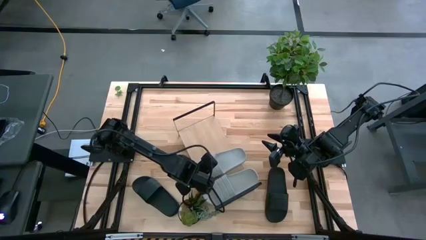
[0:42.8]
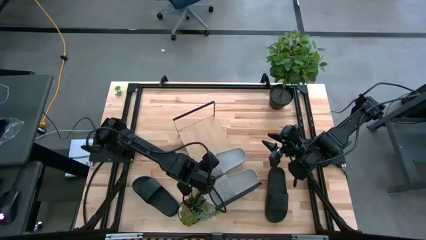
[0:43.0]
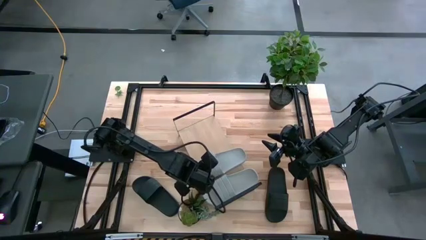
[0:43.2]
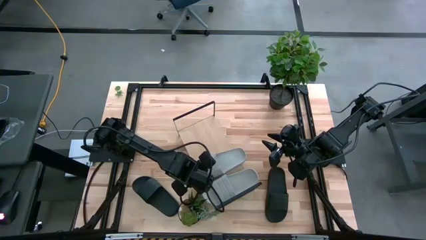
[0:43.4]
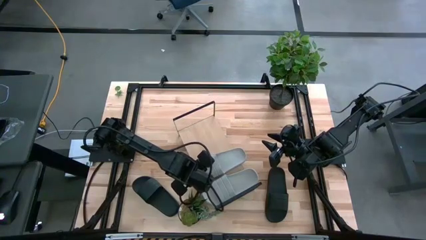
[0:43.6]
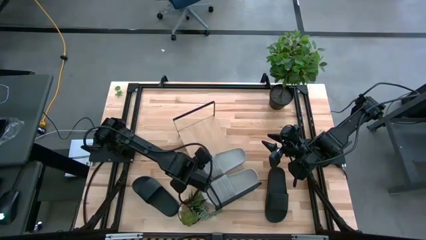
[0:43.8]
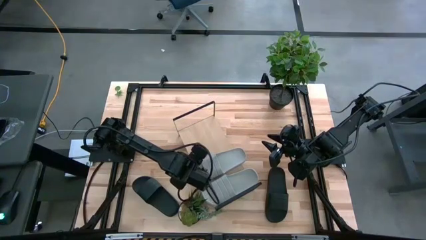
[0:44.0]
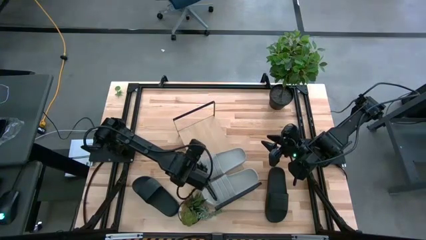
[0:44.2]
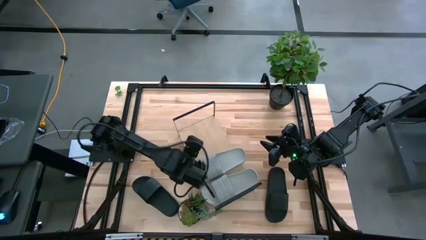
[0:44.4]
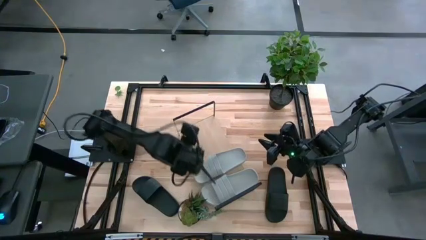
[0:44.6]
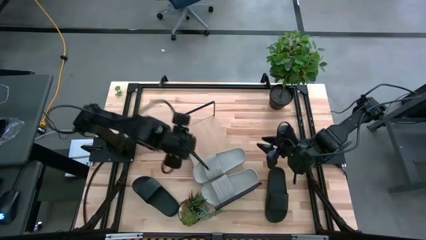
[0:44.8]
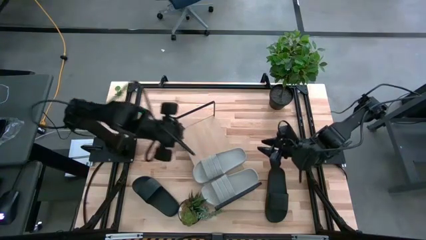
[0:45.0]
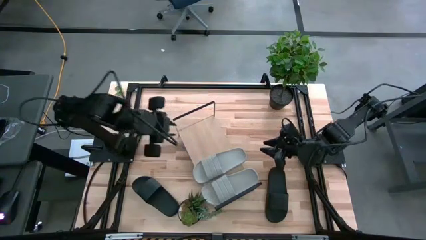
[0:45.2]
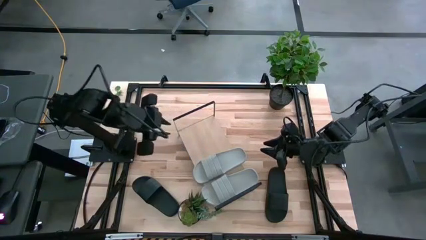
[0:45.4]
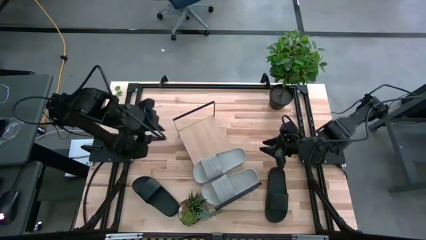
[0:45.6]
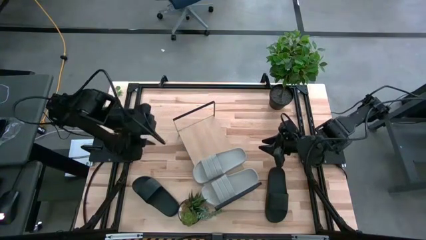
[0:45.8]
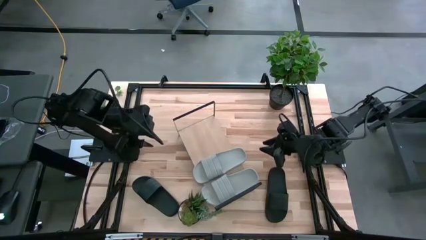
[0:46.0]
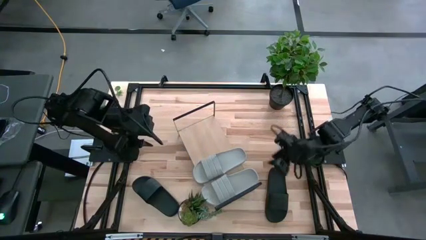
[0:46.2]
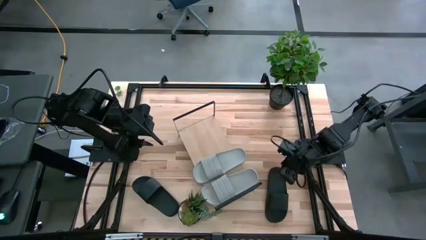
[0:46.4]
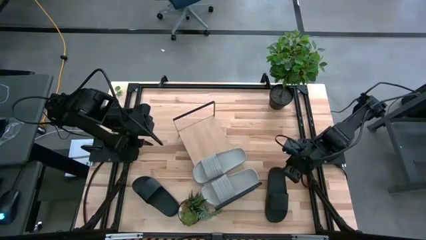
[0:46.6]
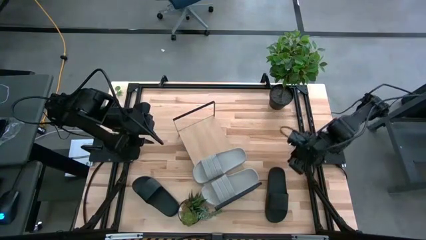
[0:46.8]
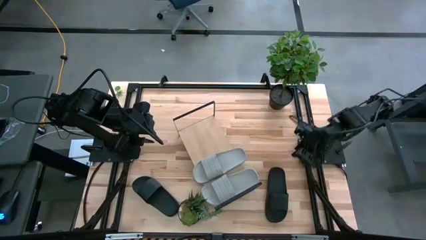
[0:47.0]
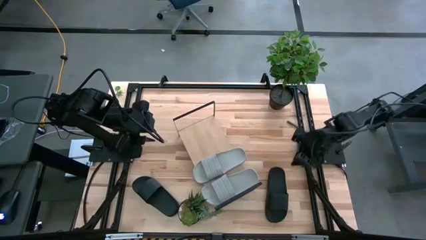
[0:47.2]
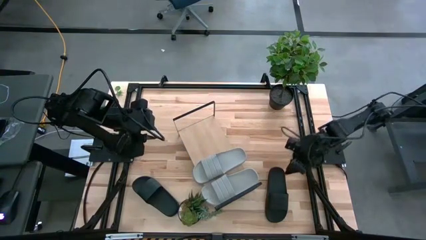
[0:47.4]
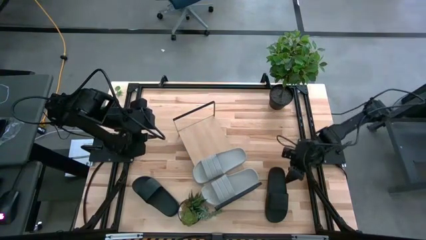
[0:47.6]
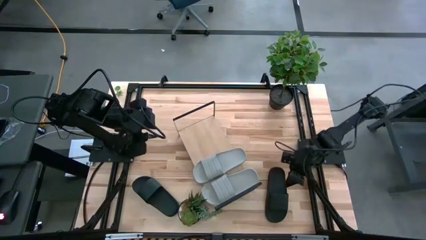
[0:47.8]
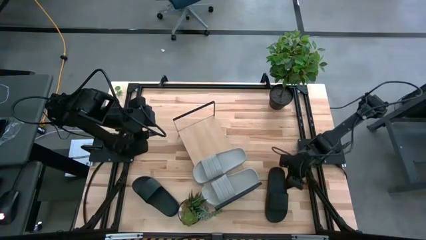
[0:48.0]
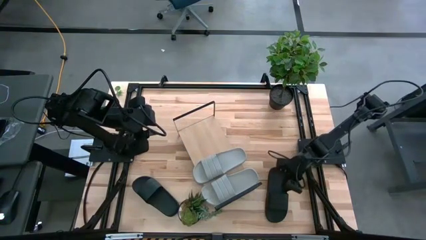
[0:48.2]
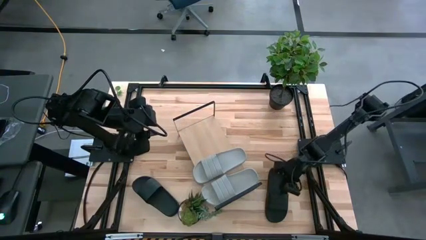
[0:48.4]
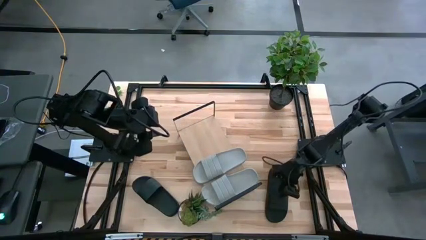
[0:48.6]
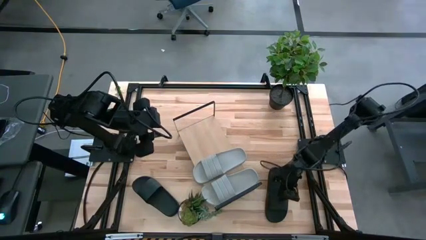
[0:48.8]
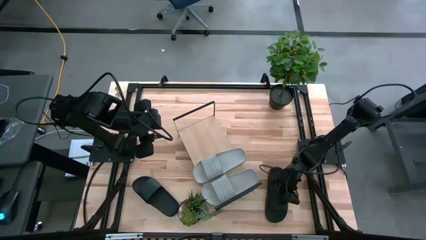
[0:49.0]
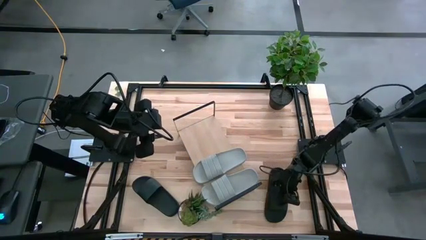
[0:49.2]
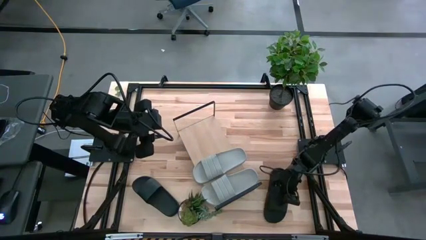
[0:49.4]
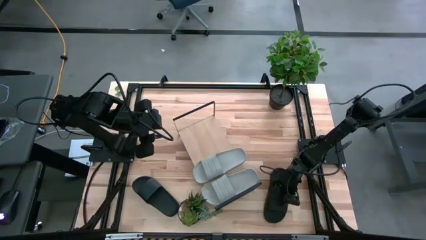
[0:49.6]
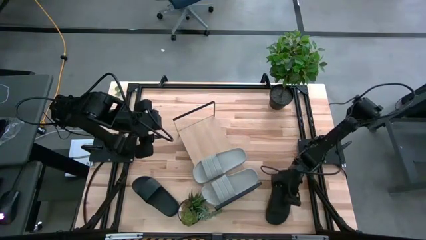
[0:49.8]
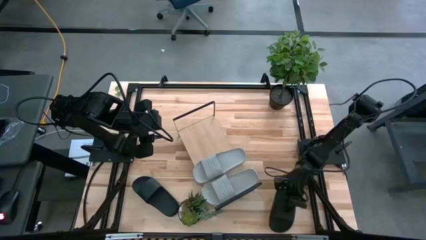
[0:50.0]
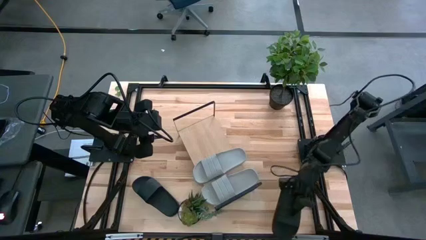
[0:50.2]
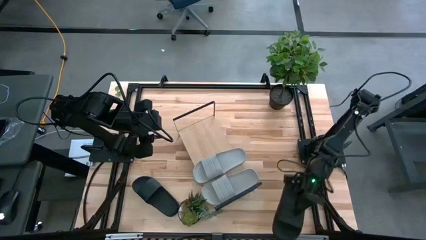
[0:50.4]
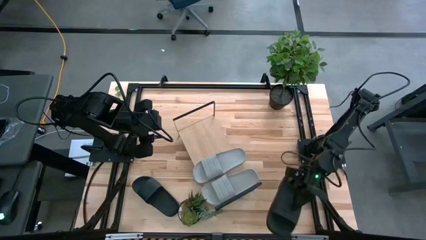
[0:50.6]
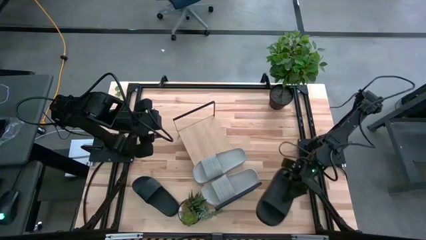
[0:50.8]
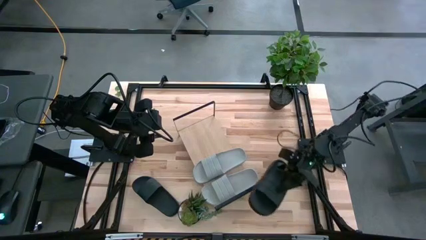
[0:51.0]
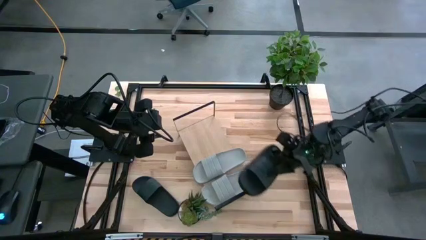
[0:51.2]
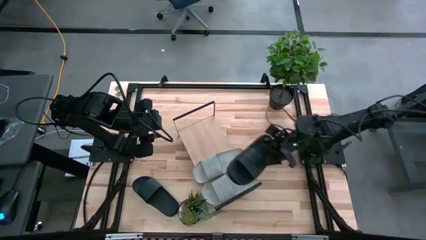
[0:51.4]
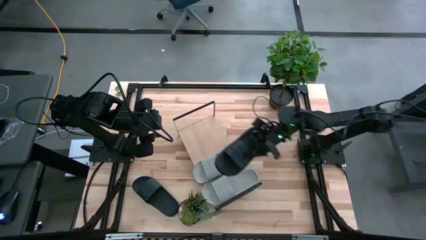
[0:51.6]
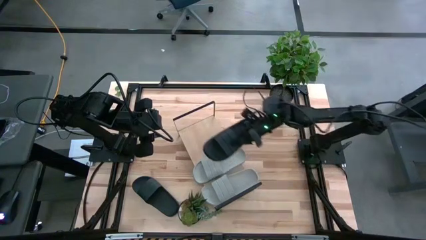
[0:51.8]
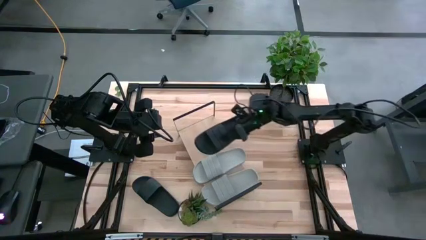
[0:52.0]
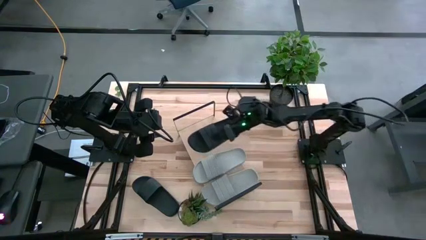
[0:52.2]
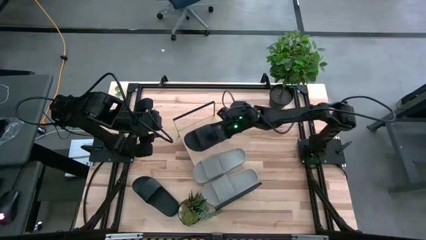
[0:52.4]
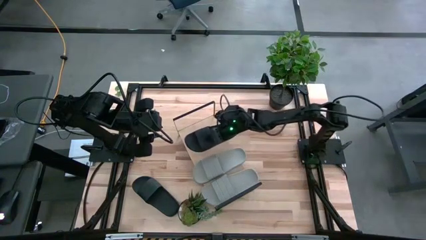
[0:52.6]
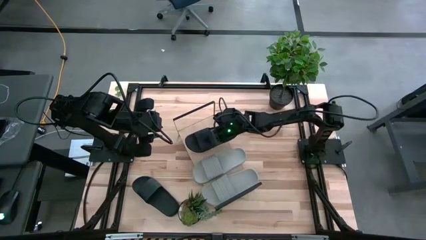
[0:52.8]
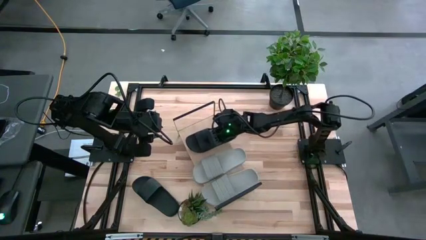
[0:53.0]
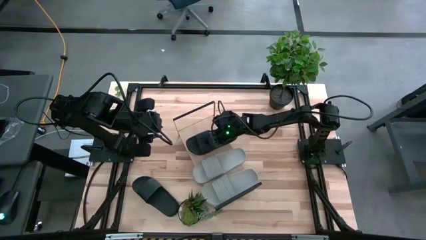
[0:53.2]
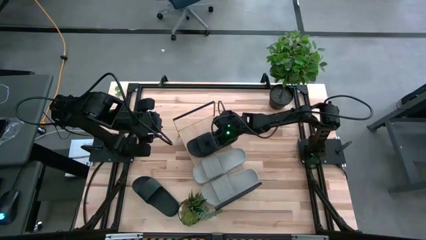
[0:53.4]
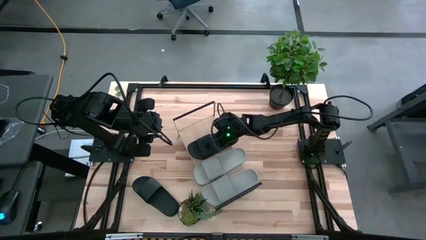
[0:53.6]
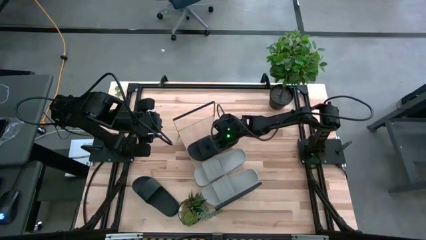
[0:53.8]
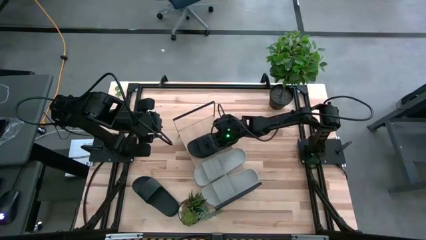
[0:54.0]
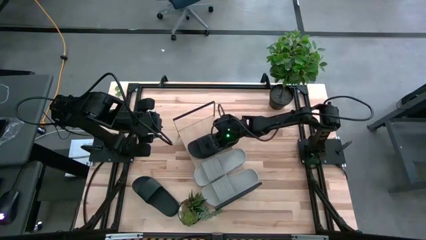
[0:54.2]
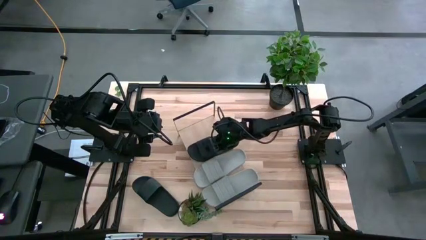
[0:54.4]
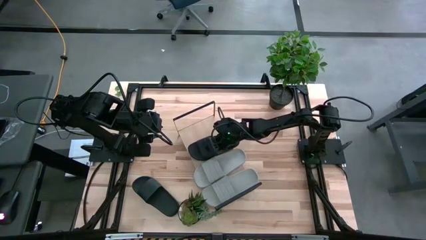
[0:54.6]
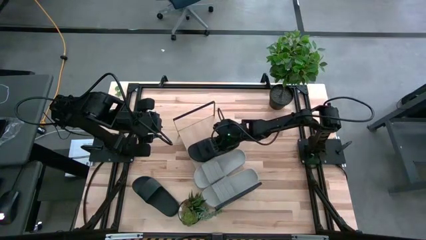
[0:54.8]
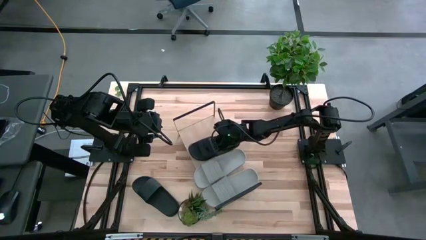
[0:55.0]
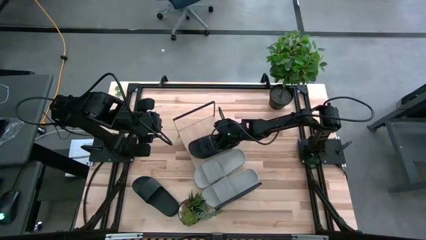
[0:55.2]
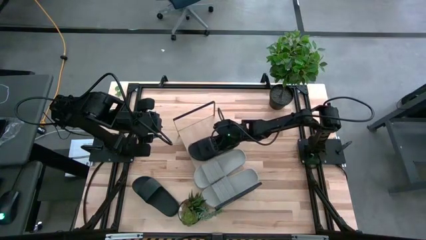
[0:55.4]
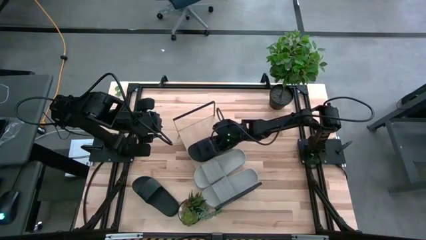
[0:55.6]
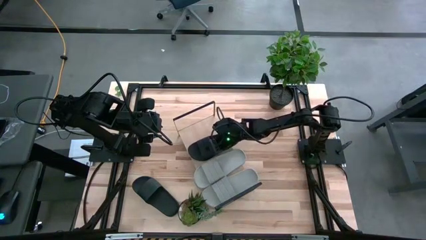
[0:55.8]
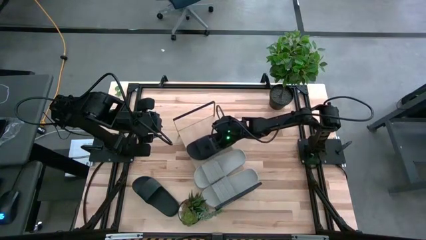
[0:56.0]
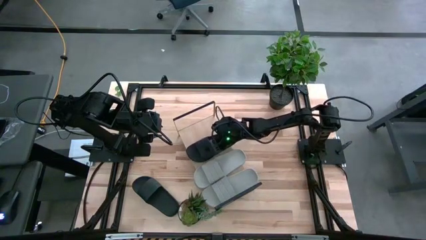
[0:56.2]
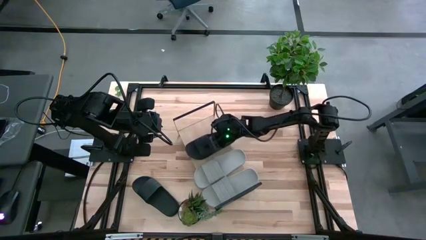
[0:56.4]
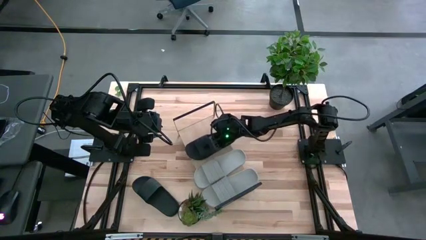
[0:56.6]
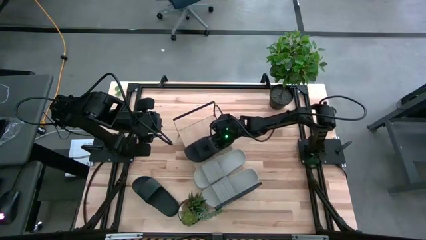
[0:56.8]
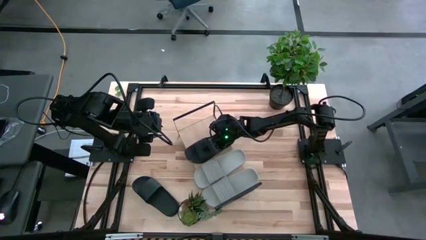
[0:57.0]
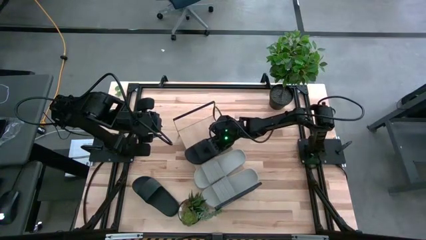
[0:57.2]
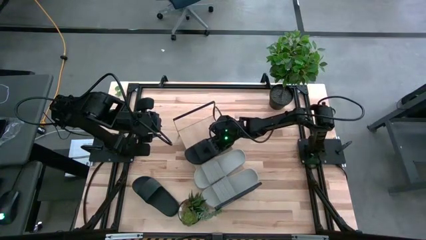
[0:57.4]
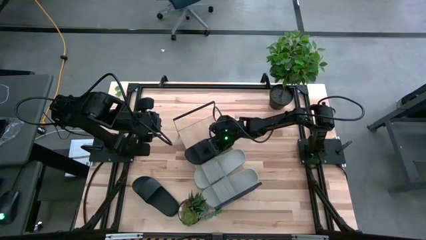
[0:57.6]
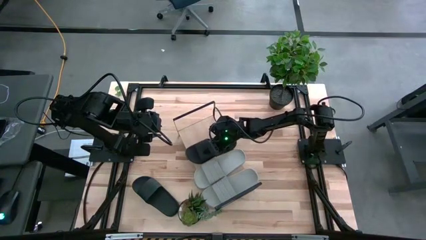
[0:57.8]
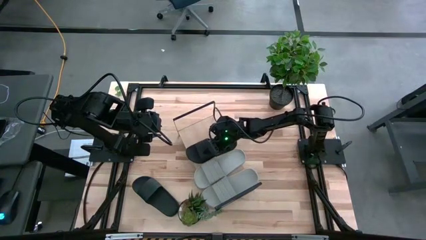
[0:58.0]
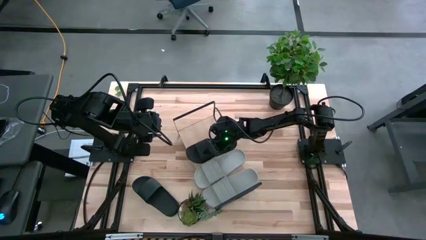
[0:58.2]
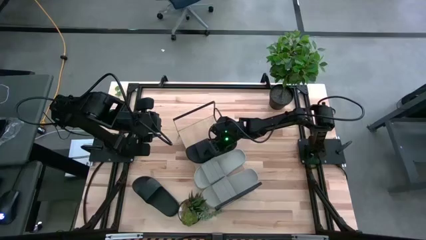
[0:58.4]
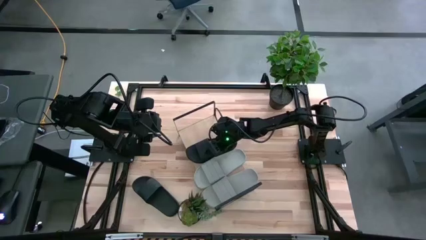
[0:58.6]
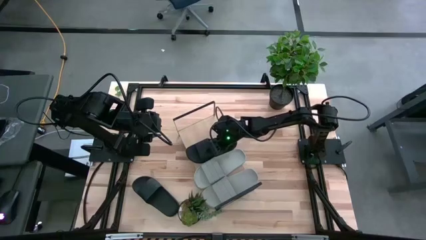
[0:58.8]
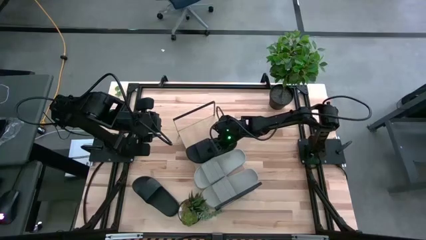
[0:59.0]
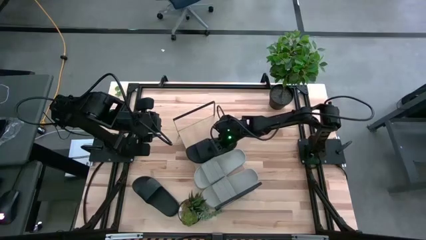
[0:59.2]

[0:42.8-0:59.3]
Task: Pick and place slides into the shelf
Put the right black slipper on the shelf
